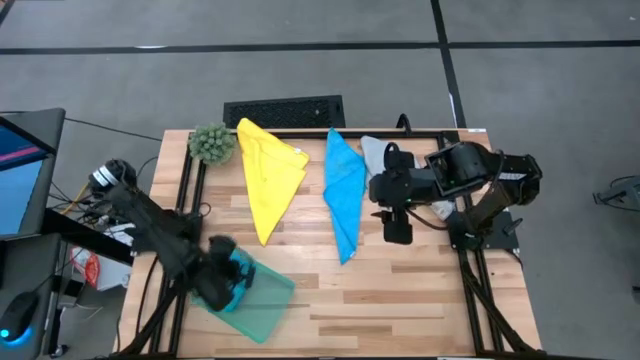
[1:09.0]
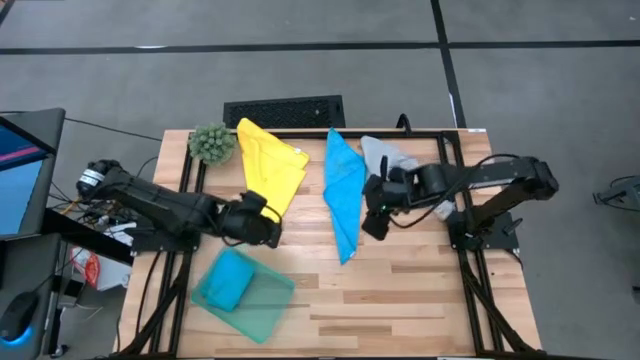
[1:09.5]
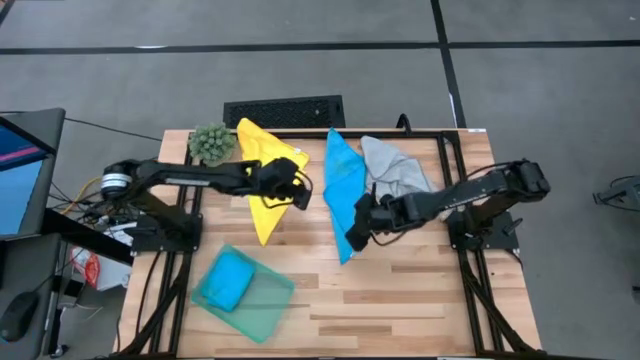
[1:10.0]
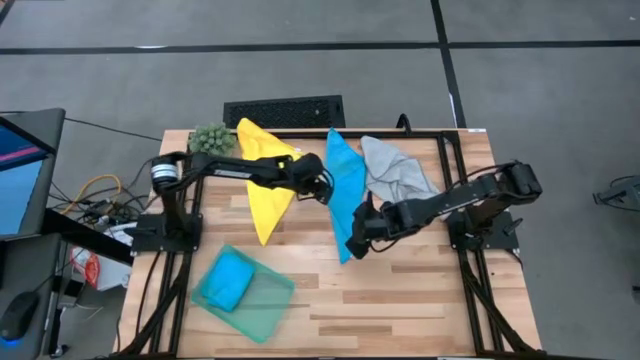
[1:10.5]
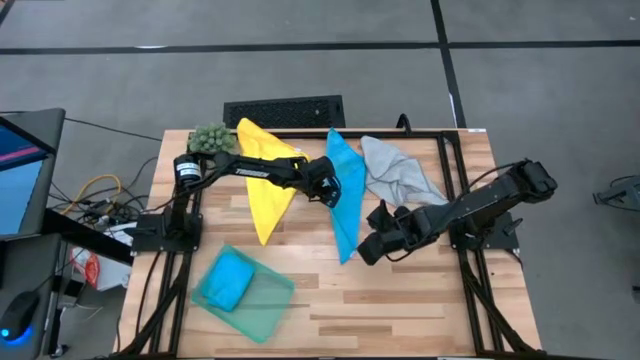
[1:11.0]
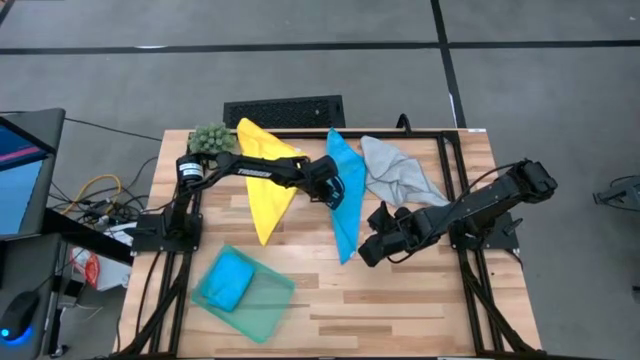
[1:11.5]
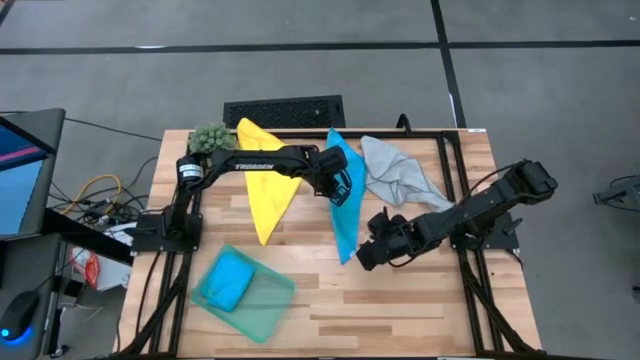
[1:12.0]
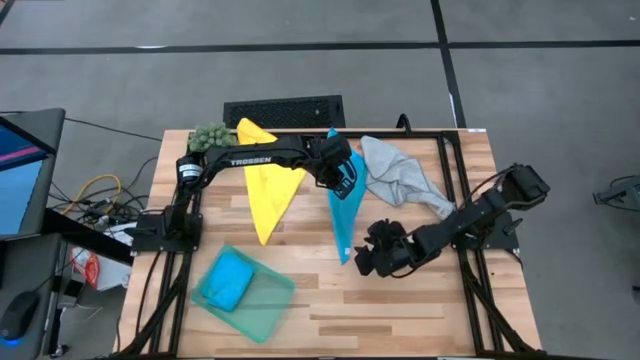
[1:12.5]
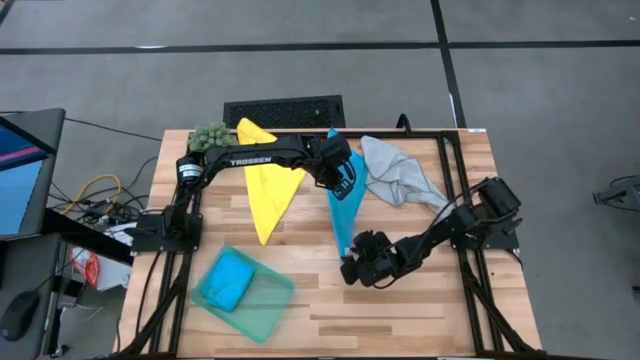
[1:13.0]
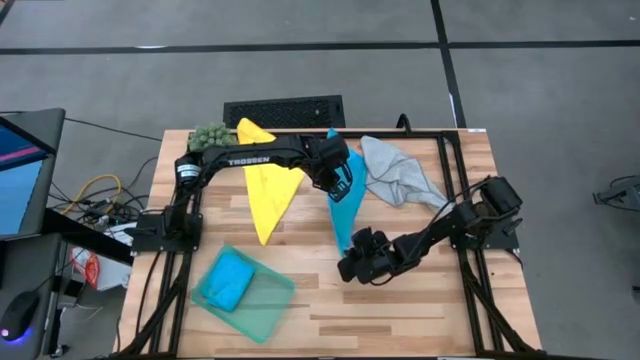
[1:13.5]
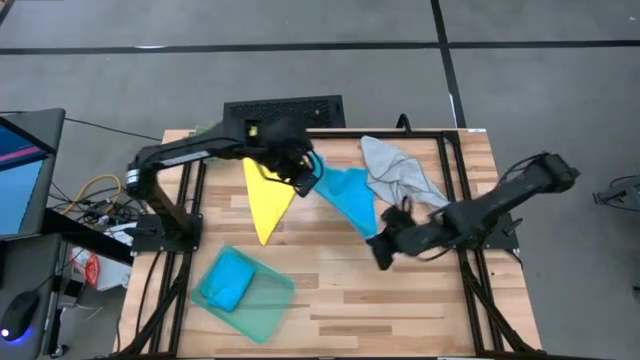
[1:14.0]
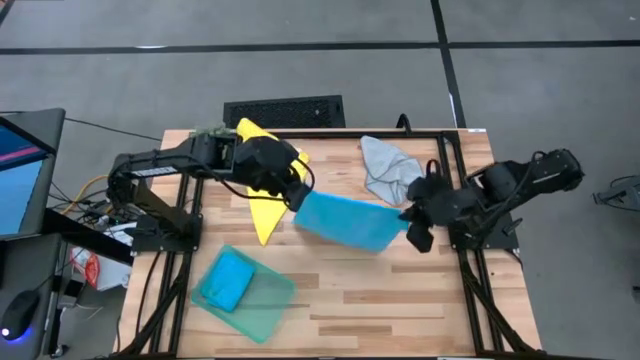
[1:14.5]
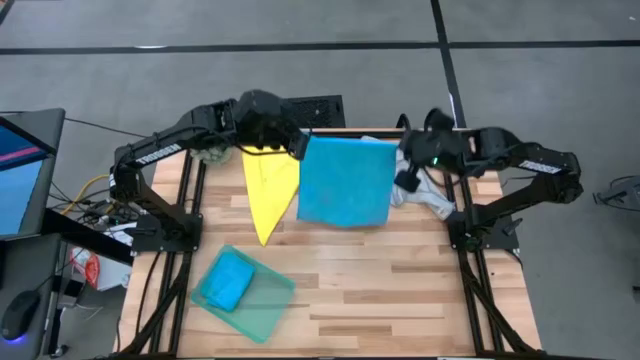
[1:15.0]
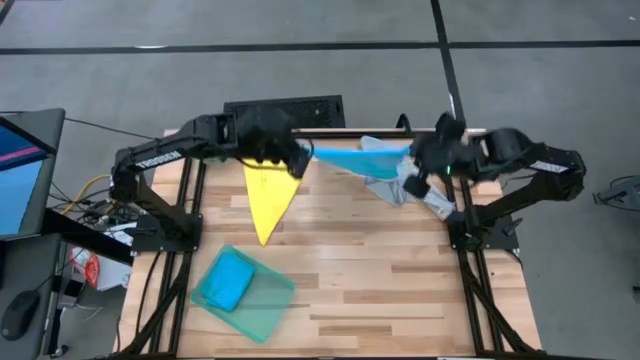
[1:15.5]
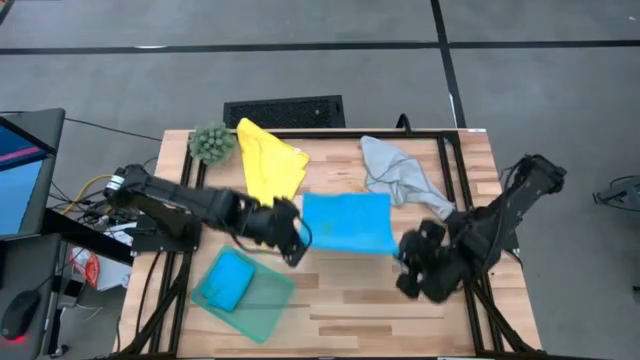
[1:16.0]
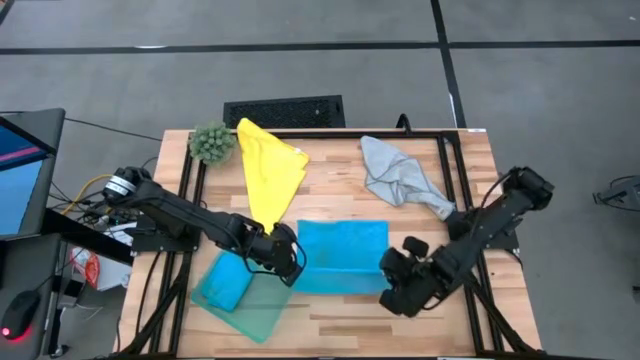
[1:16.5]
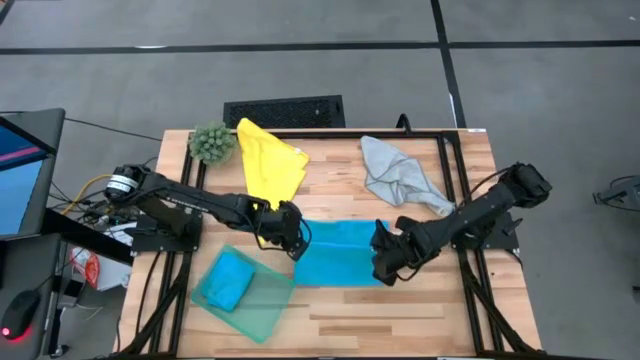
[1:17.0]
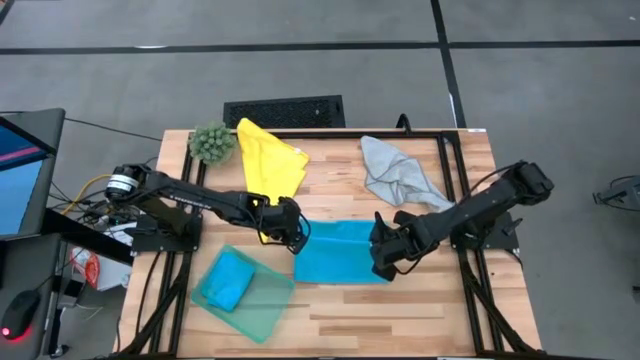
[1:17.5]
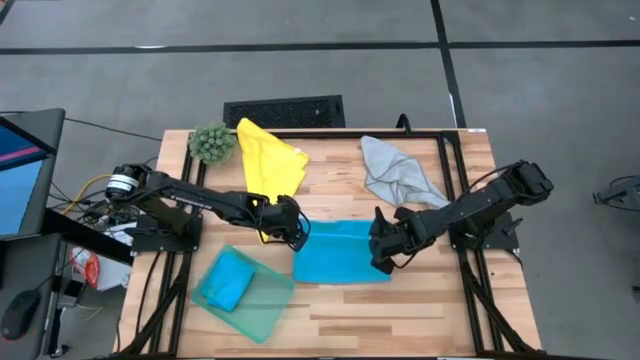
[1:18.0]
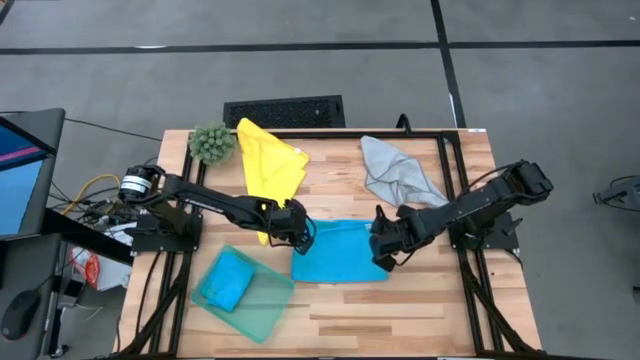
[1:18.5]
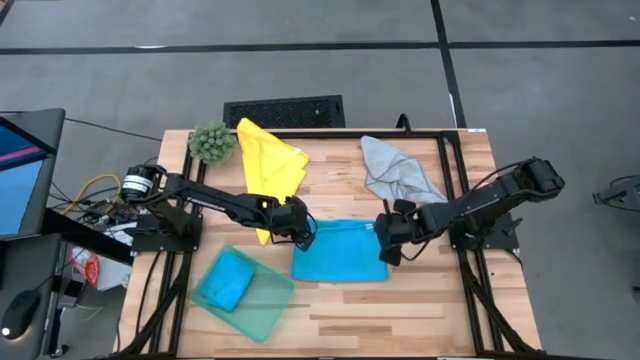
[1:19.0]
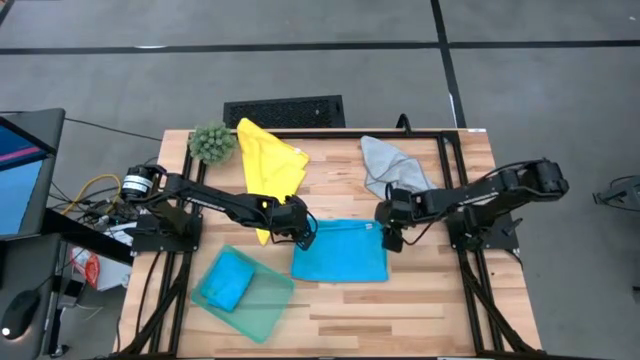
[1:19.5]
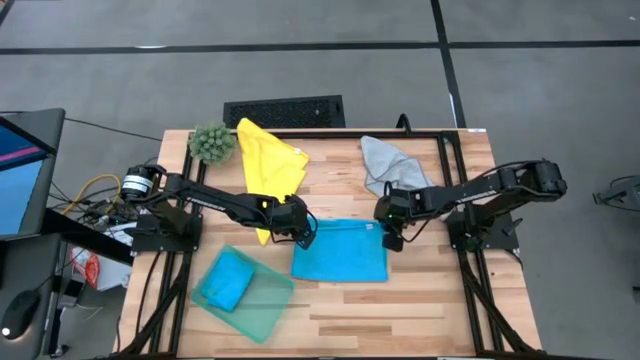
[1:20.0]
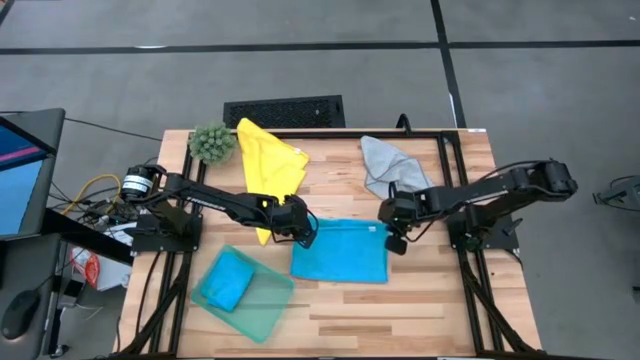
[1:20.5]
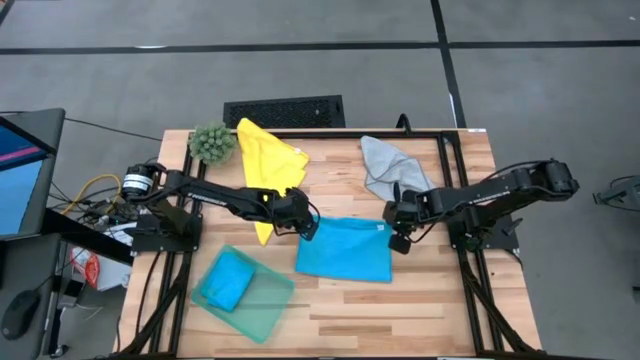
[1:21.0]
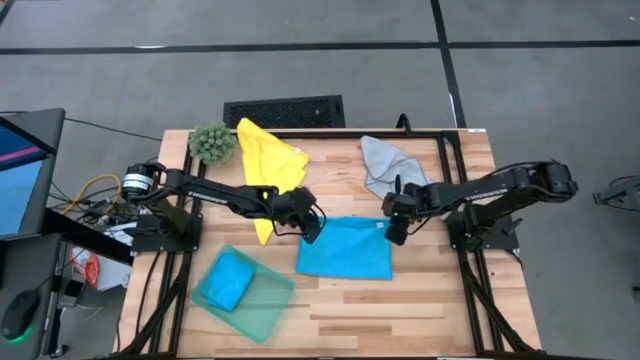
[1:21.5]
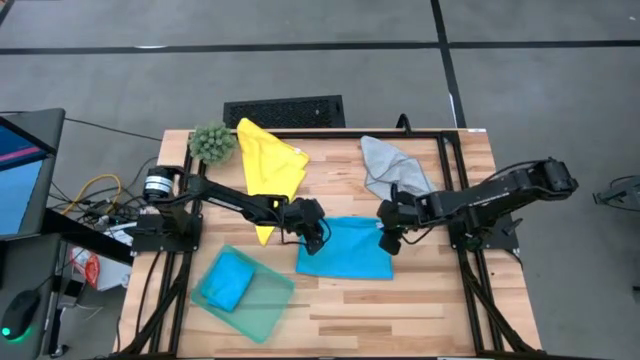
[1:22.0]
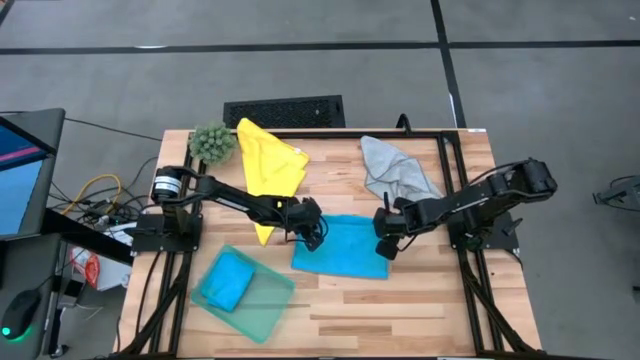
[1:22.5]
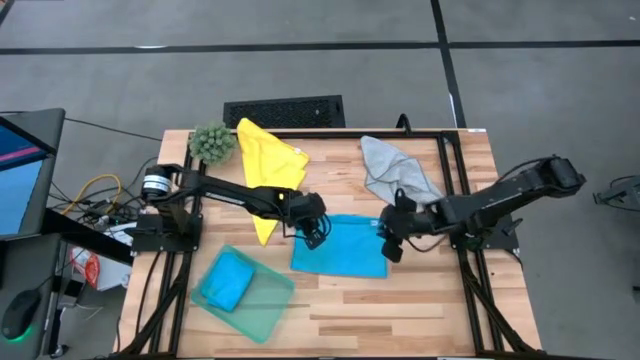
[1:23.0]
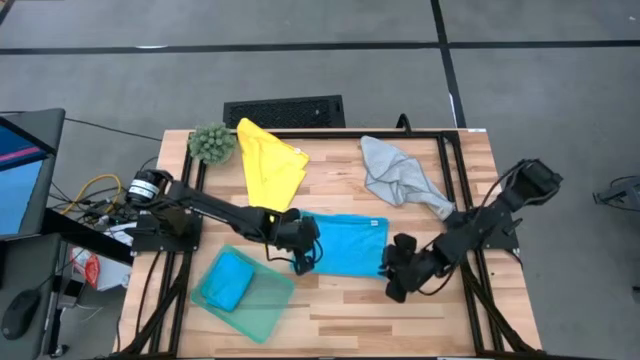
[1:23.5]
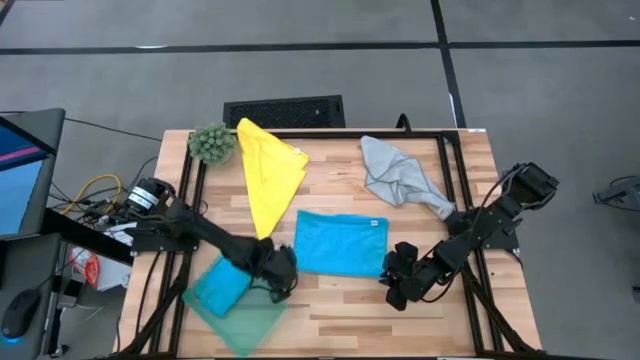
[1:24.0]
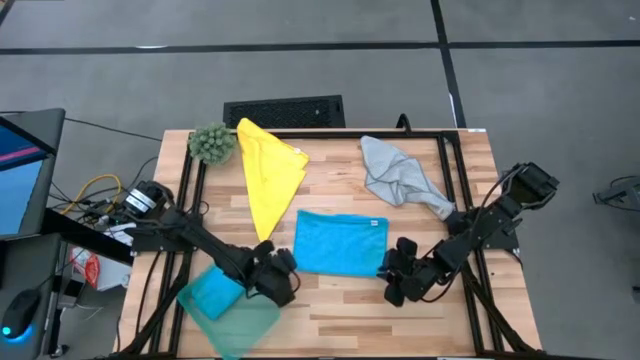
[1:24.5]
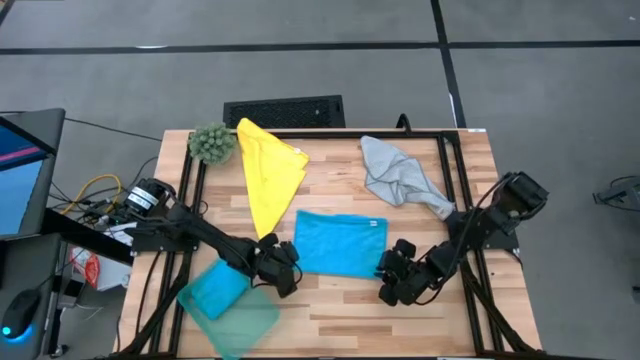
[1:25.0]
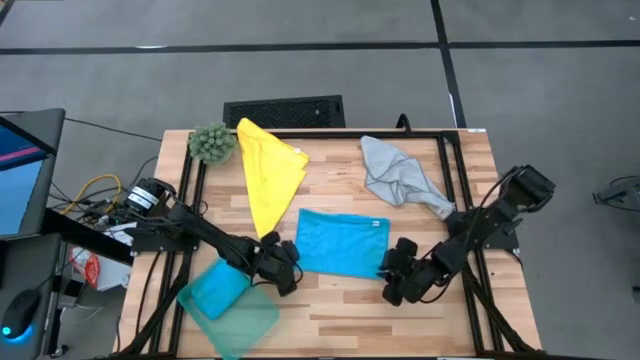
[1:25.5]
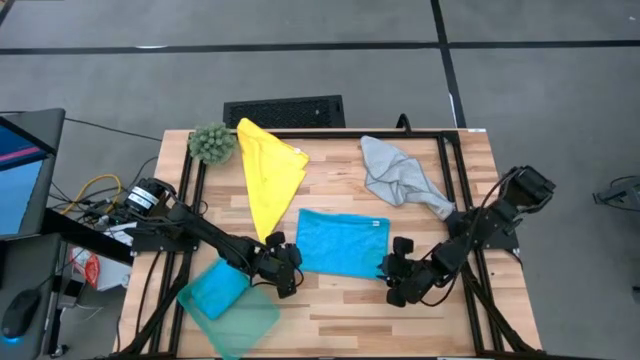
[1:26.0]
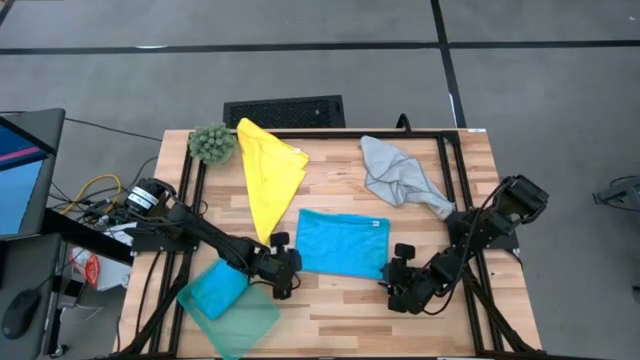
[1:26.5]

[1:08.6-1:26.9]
Task: Fold microfiber towels
Fold the blue towel

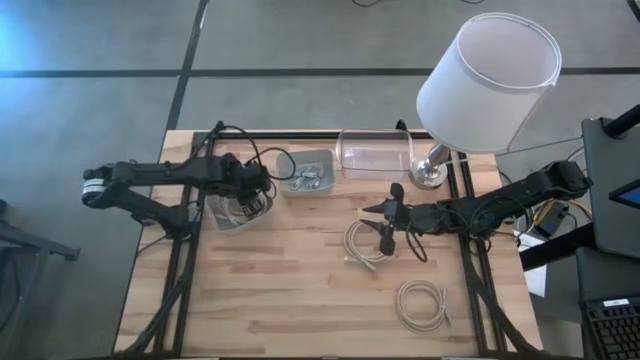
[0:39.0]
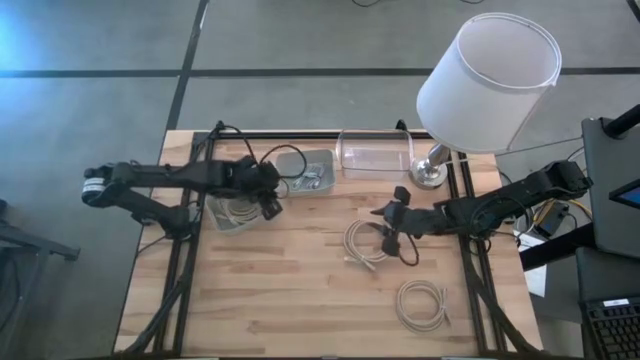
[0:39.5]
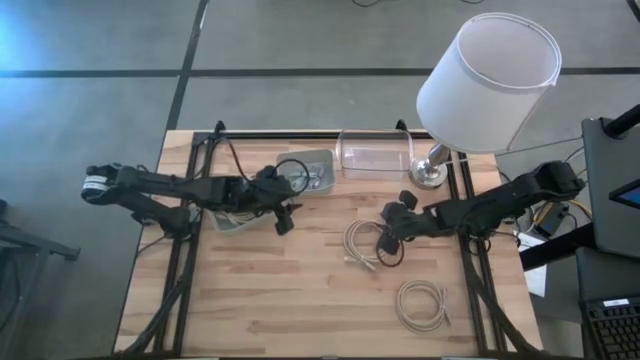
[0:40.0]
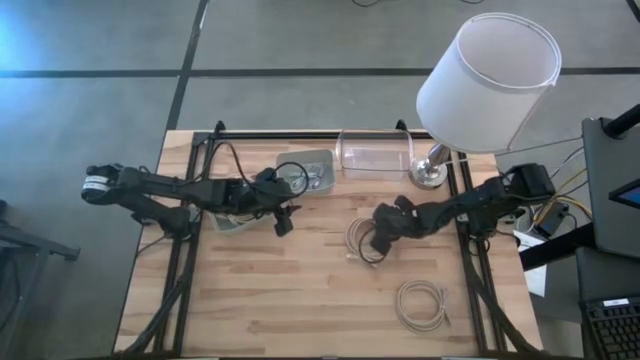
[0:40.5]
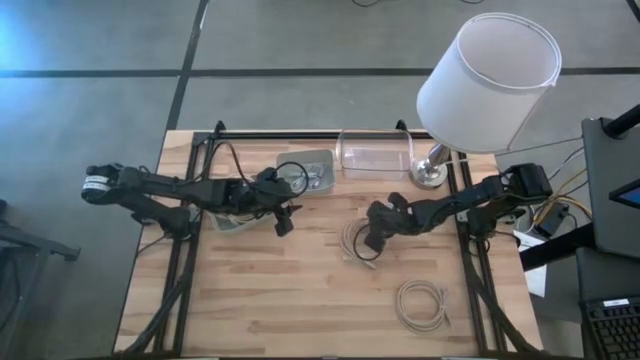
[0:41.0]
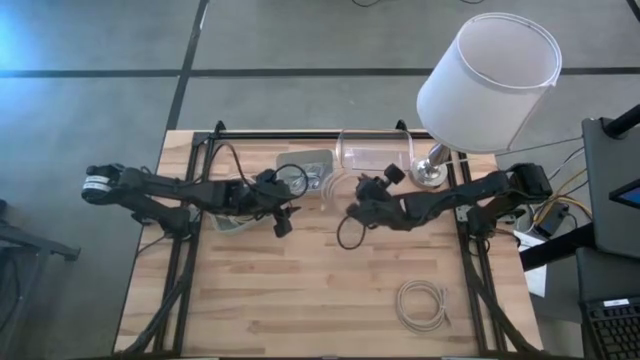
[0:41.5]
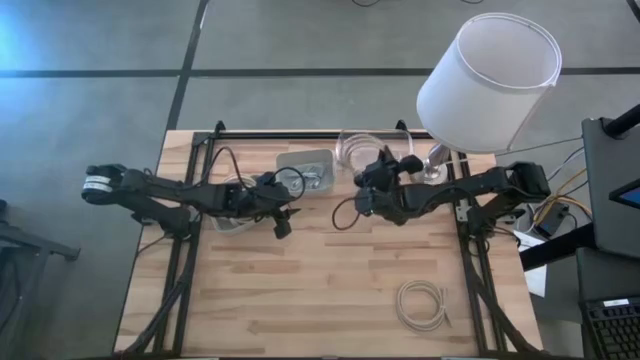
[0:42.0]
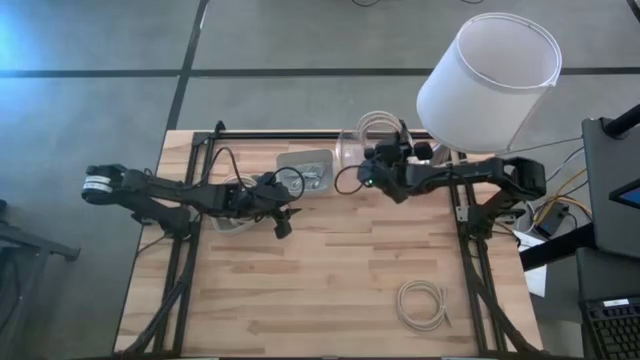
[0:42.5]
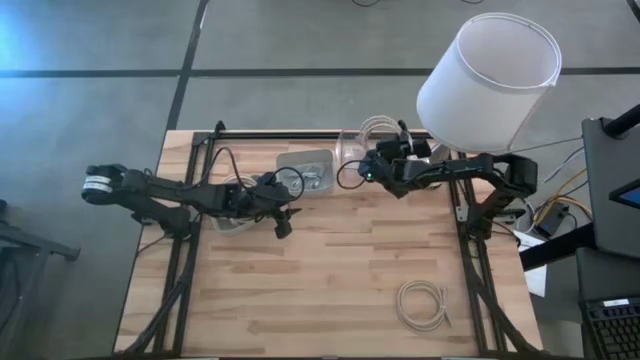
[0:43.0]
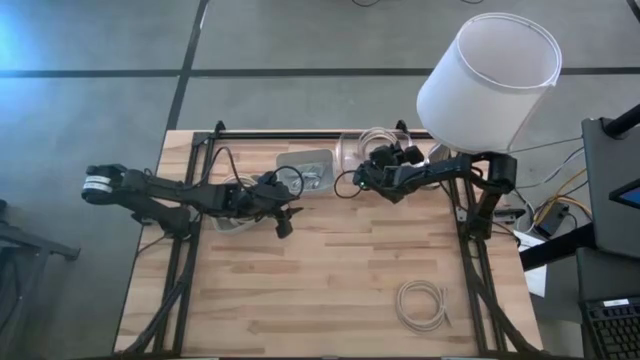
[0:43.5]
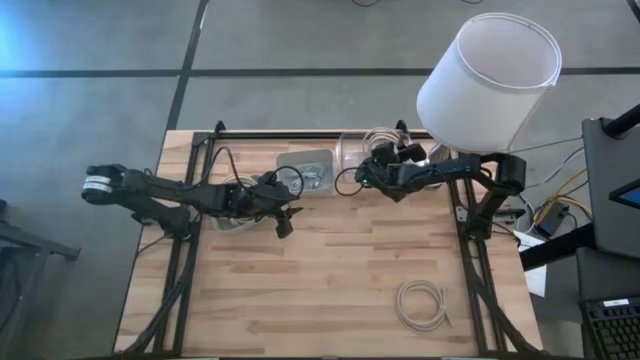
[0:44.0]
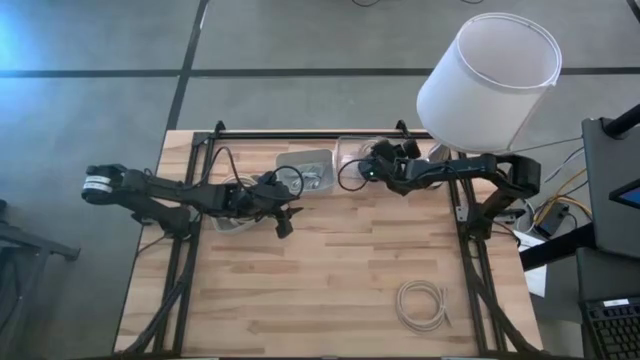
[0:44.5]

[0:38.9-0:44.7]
Task: Pick & Place USB Port
Put the light brown HDMI cable into the transparent bin
